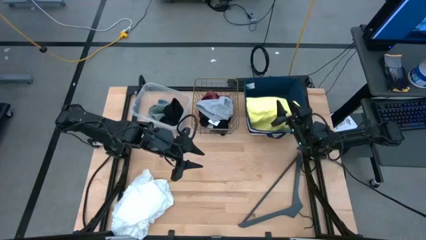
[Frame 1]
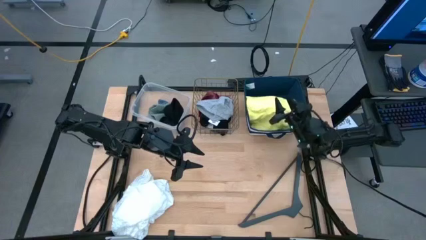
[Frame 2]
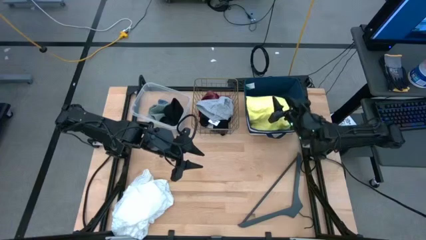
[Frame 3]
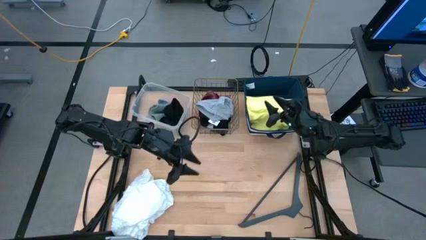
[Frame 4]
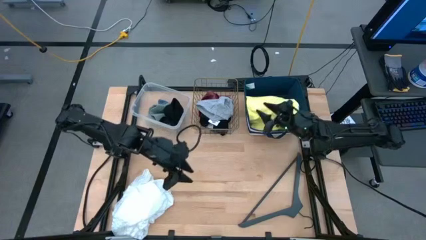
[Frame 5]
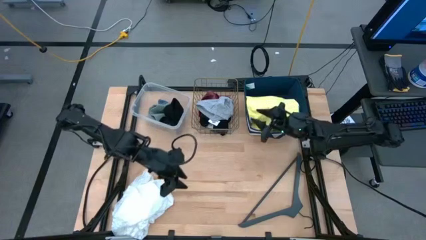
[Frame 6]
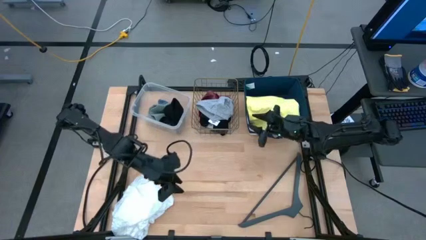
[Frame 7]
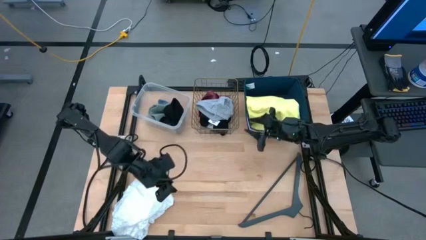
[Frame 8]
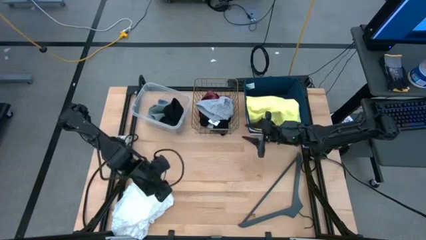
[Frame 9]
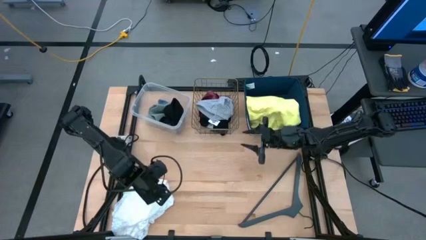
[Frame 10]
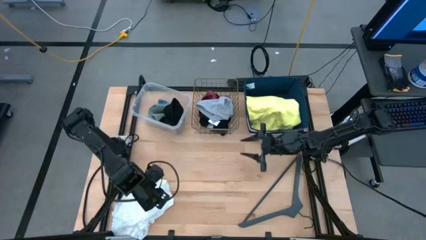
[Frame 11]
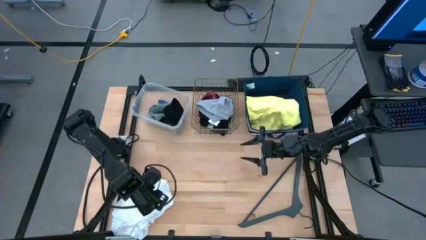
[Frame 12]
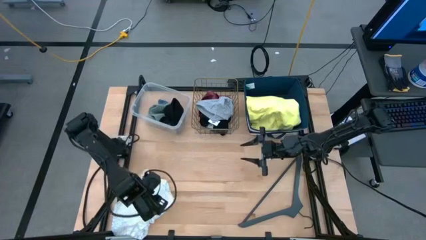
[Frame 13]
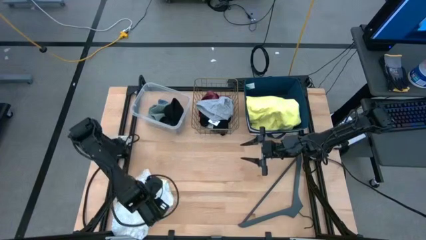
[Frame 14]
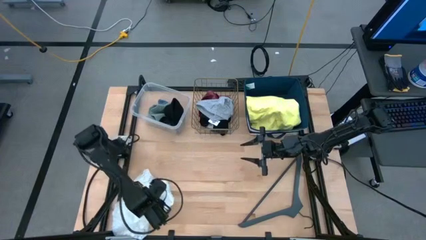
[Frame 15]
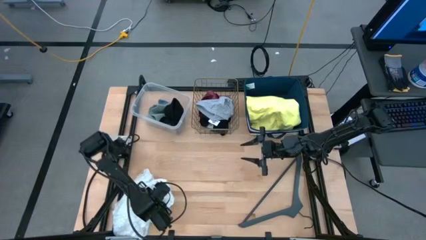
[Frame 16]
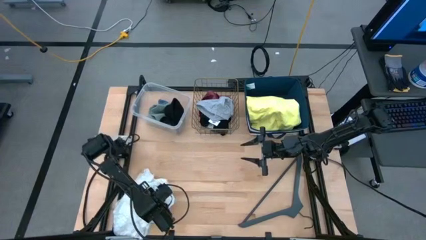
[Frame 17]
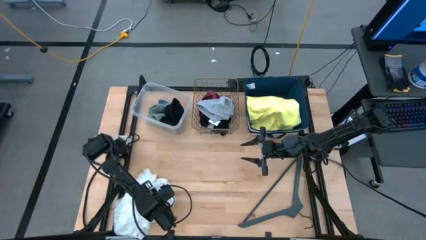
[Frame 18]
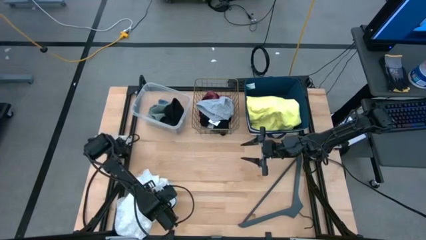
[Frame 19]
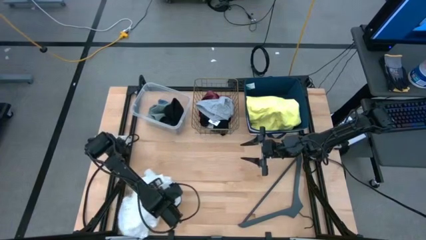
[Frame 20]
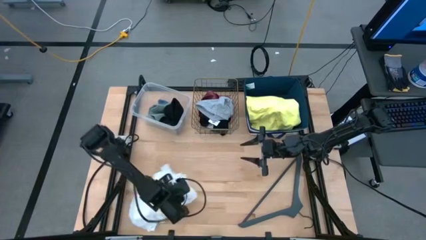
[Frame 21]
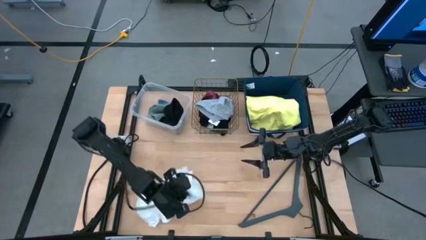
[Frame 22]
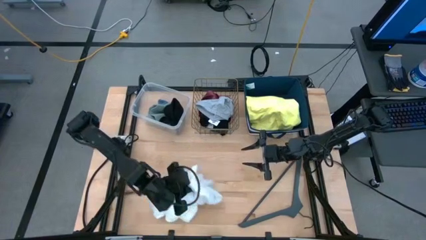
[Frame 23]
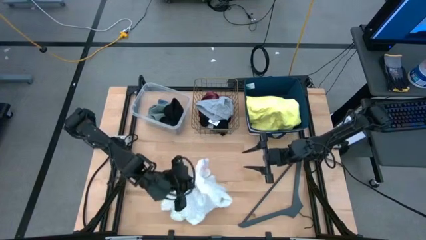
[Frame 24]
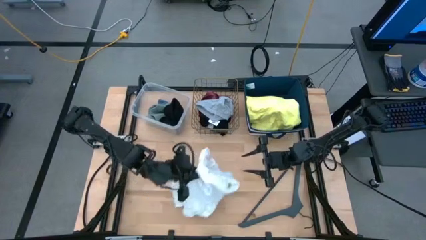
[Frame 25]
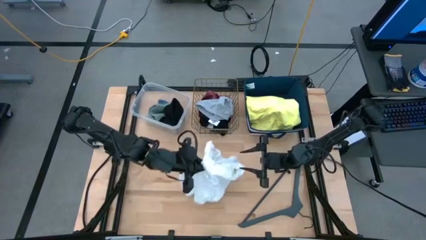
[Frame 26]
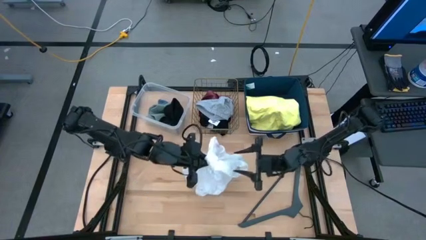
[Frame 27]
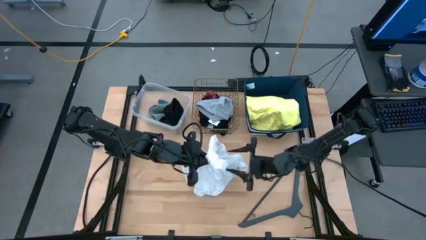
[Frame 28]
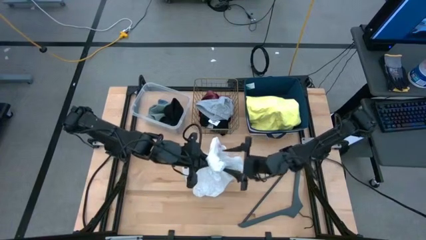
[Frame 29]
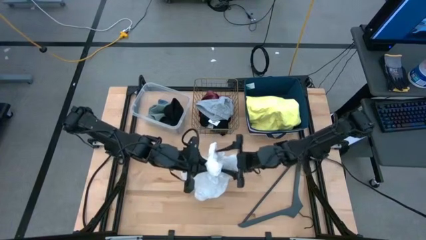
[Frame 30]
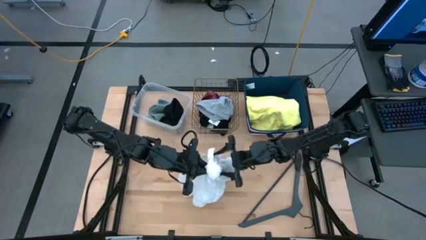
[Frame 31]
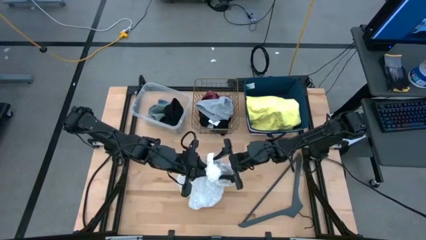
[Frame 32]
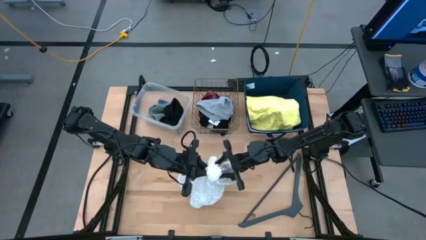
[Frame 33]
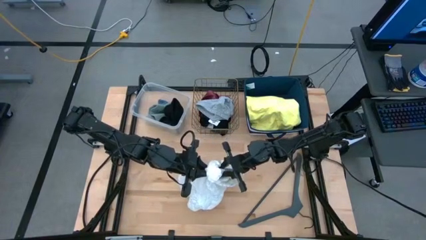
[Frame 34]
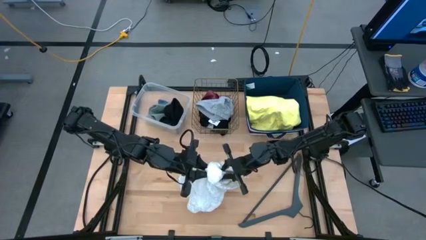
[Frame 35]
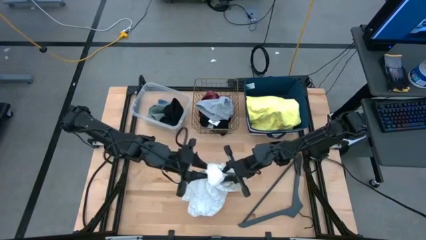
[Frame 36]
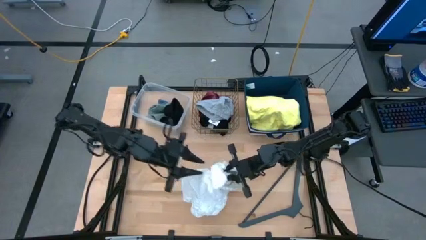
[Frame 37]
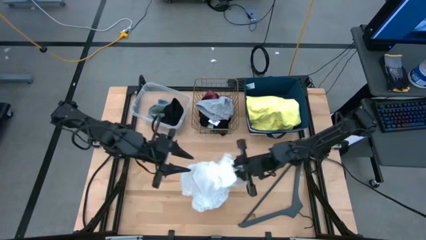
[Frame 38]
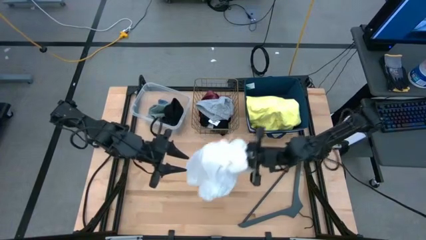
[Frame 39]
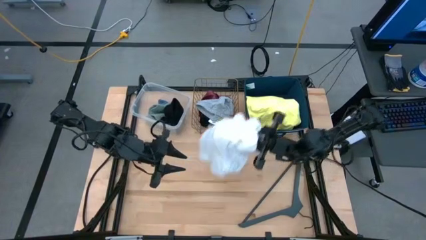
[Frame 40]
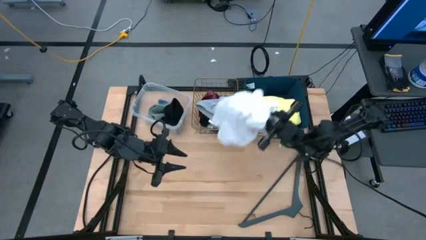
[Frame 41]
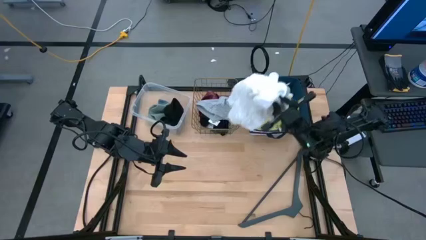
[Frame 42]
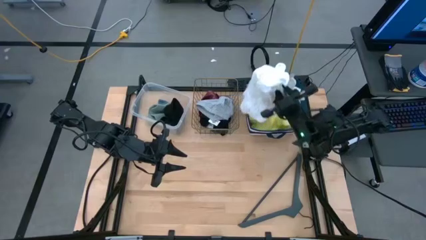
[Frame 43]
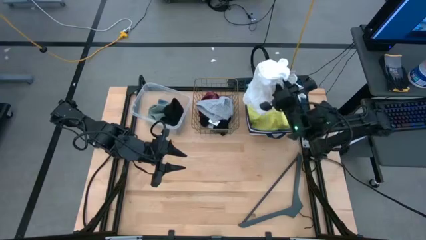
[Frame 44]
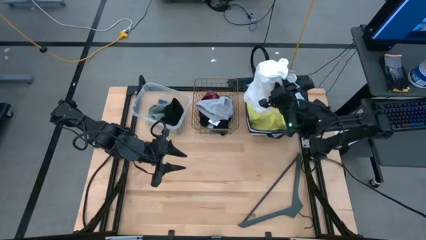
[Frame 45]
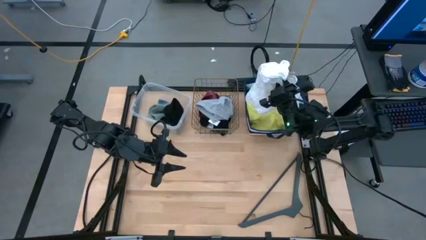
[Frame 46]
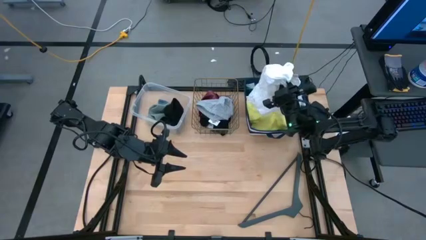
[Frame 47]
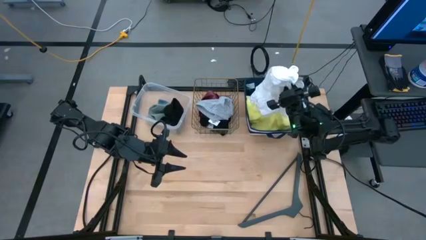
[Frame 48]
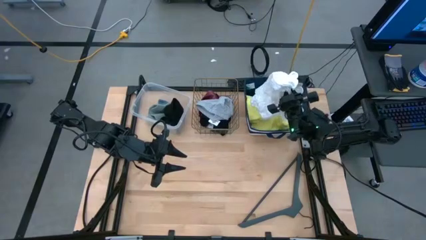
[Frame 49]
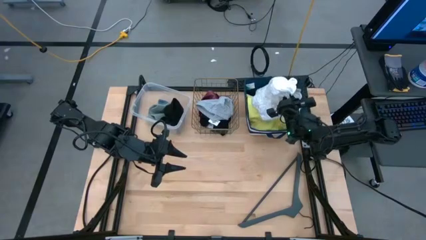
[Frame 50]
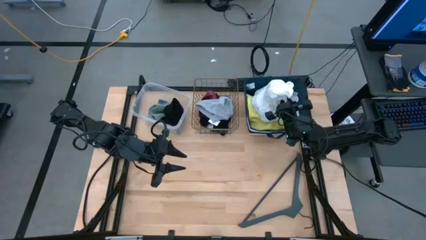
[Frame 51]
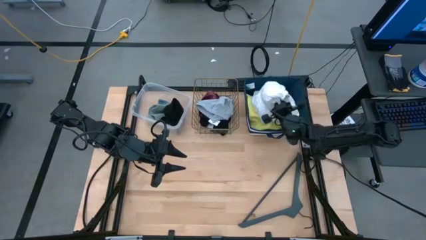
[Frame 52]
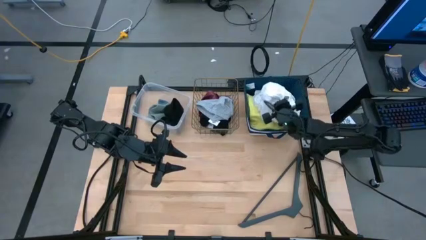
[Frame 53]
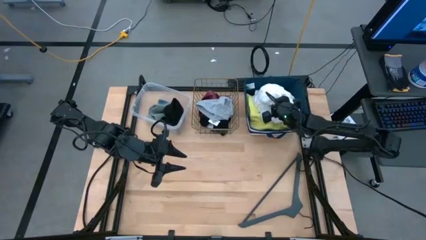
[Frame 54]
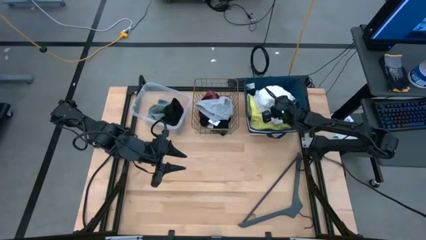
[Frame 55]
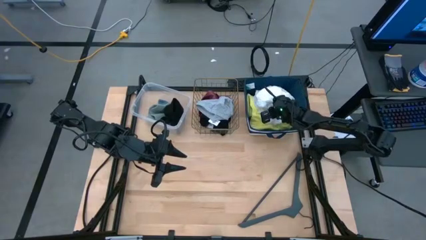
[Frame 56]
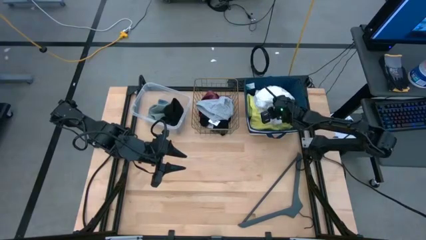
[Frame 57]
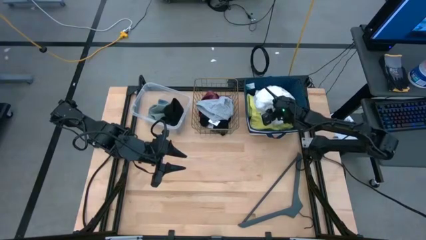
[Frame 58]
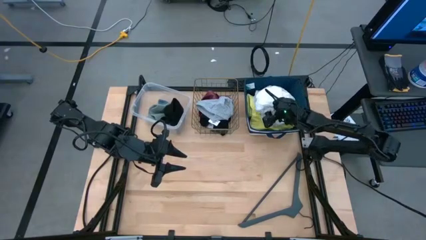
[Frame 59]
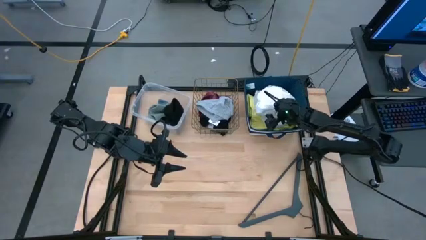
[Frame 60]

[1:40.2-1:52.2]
Task: Pick & Place Cloths
Put the white shirt into the blue bin

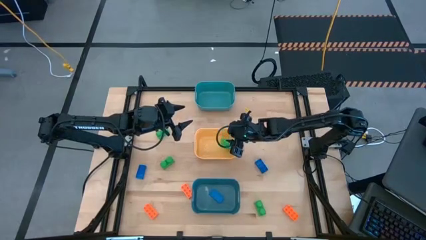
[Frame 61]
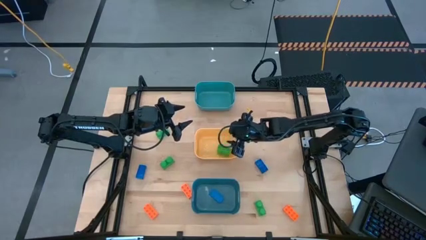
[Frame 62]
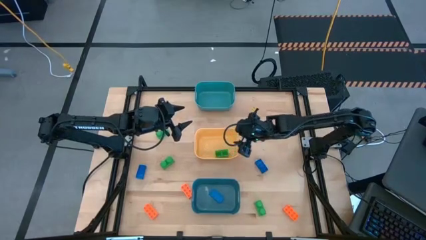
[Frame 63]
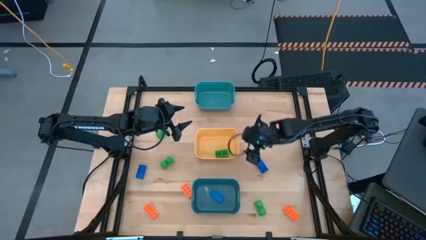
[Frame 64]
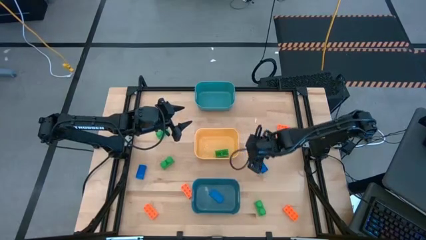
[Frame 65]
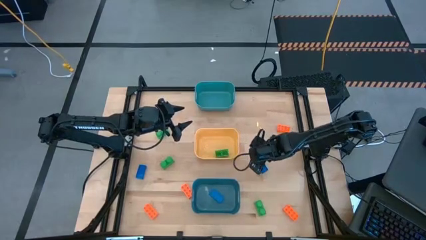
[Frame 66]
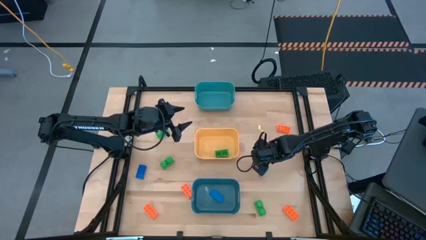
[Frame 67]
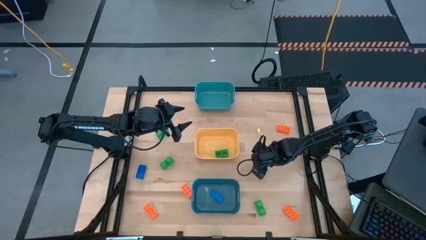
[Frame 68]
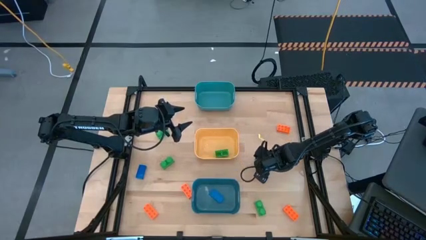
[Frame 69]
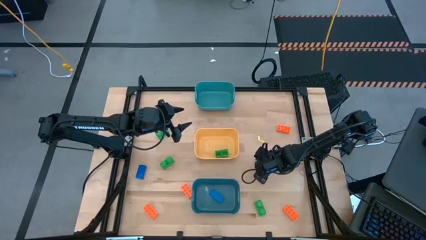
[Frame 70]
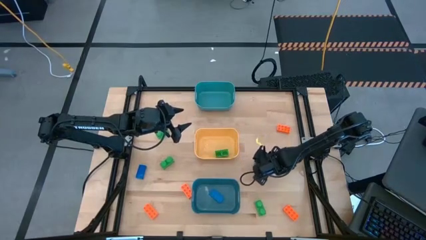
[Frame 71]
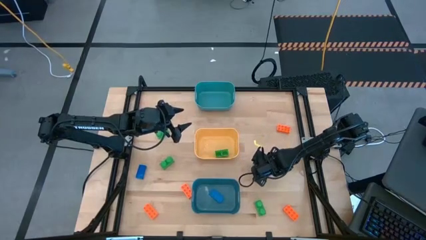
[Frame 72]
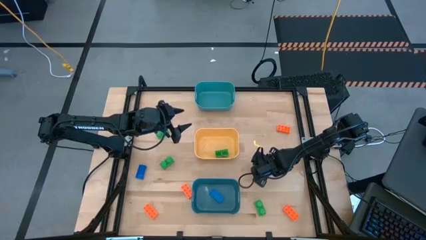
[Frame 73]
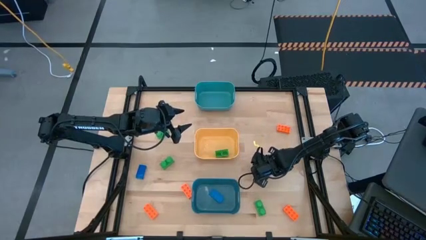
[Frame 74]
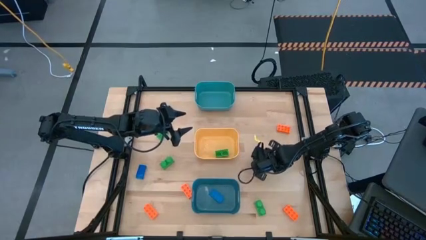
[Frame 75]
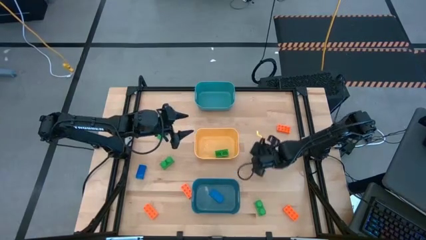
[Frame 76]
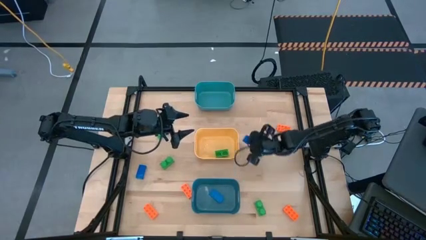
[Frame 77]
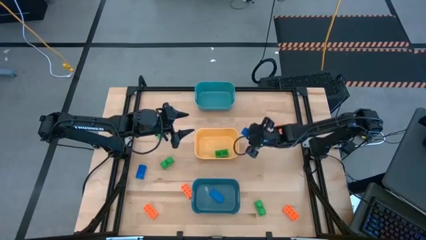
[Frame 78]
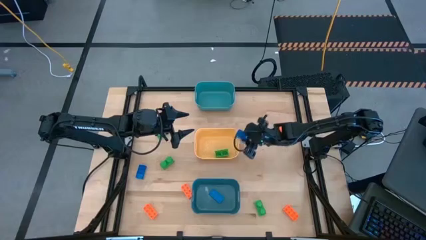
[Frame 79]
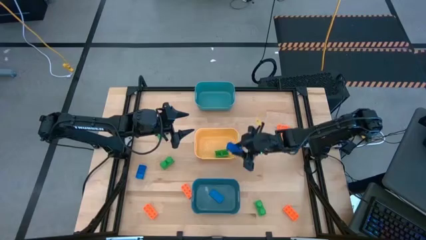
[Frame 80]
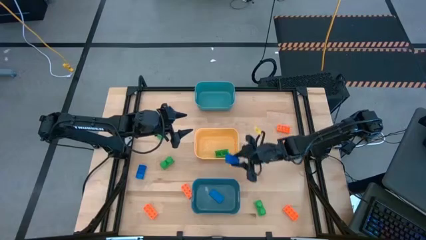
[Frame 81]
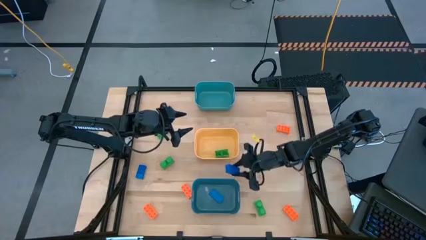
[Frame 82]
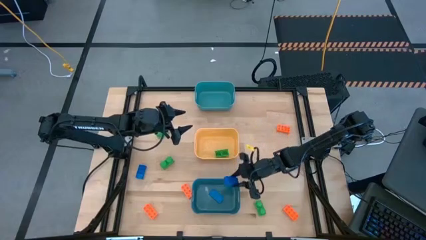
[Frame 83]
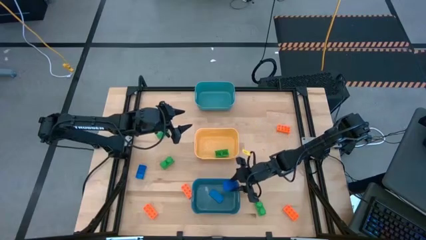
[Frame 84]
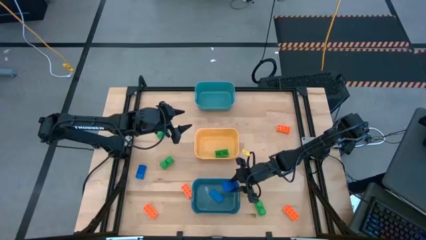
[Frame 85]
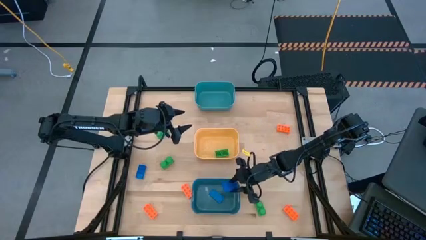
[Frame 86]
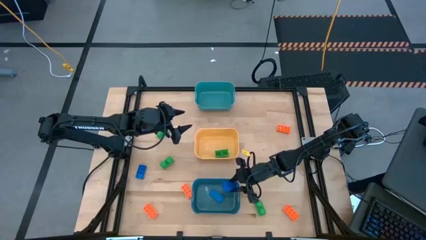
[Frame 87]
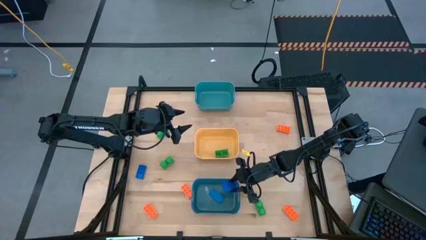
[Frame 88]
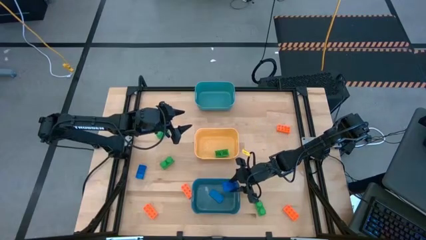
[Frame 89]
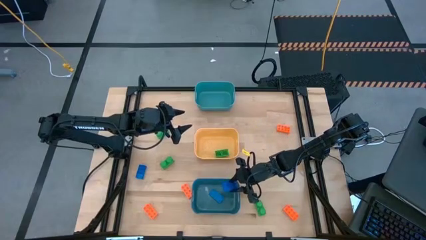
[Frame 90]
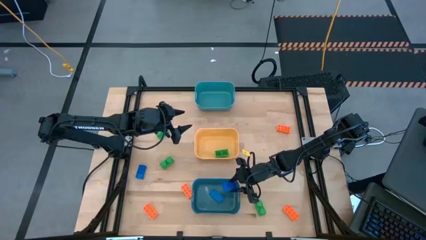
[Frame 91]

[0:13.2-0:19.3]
Task: Sort & place blocks by color
Put the blue game piece into the blue bin
